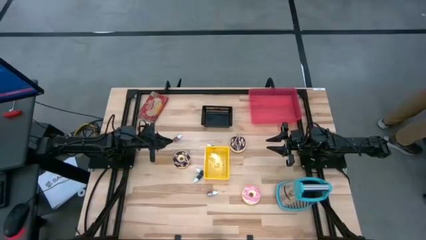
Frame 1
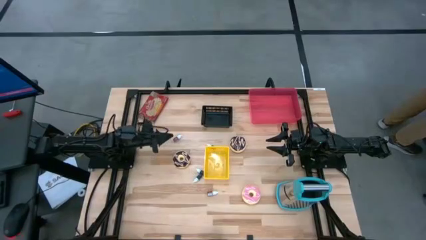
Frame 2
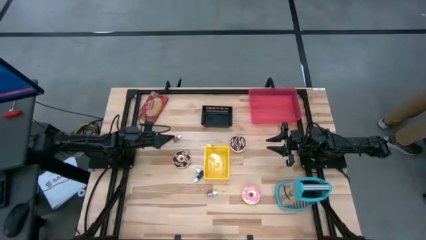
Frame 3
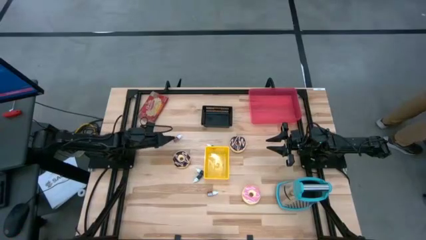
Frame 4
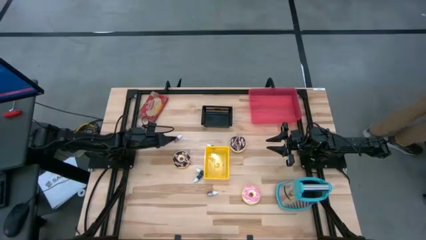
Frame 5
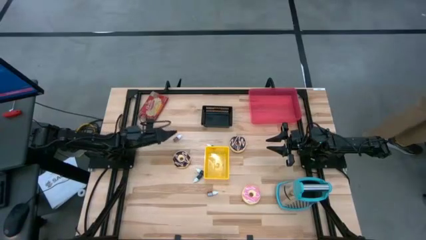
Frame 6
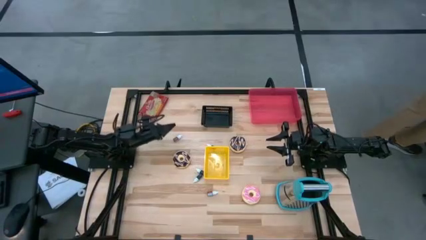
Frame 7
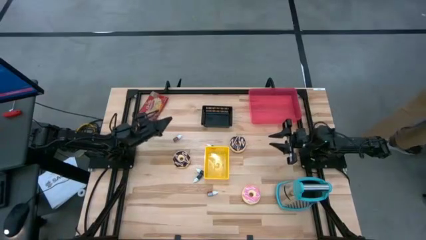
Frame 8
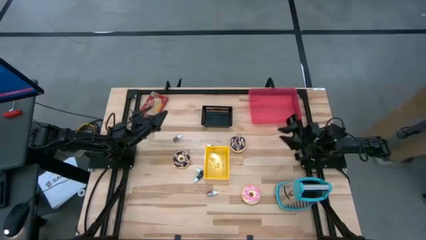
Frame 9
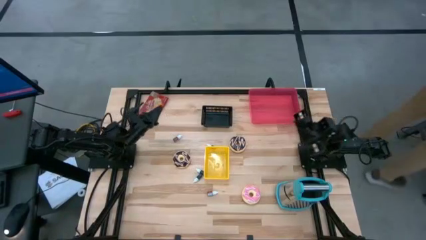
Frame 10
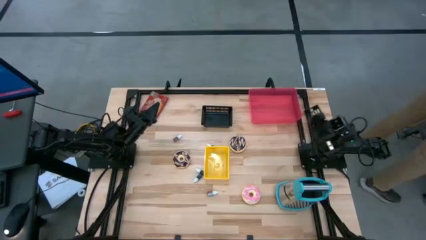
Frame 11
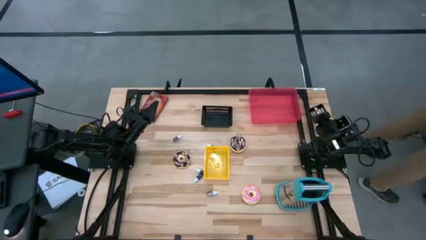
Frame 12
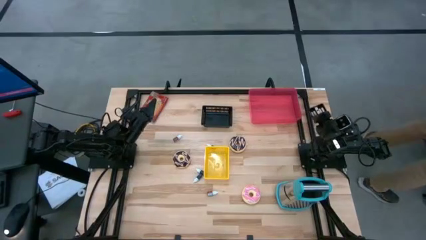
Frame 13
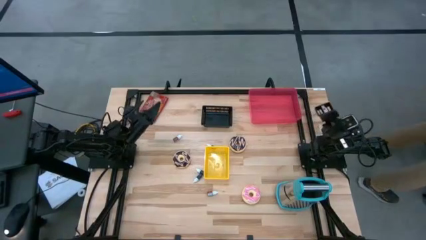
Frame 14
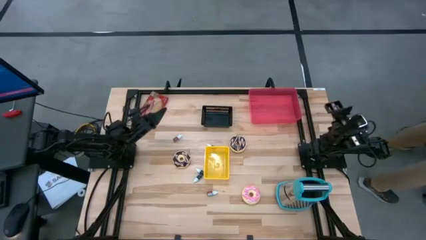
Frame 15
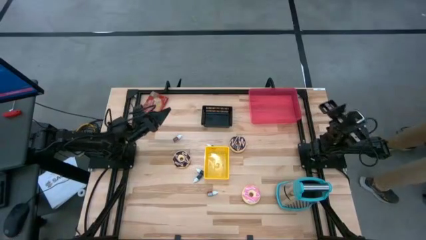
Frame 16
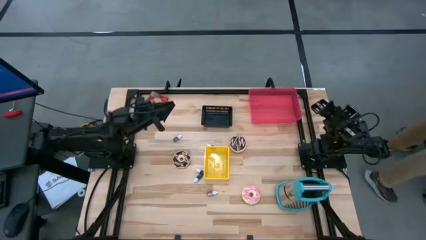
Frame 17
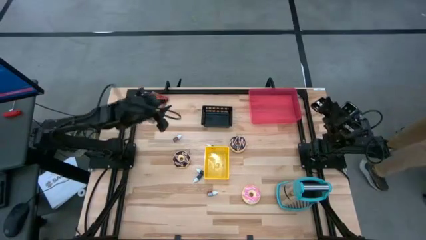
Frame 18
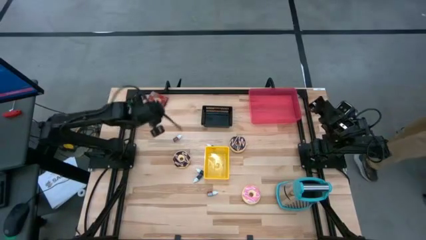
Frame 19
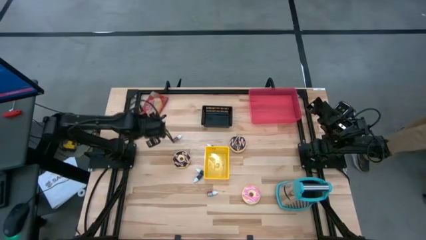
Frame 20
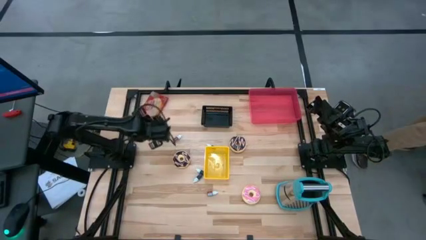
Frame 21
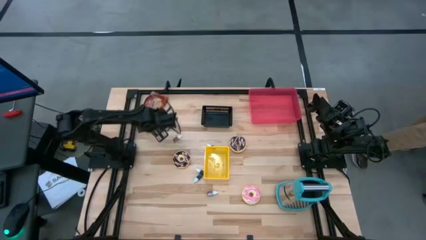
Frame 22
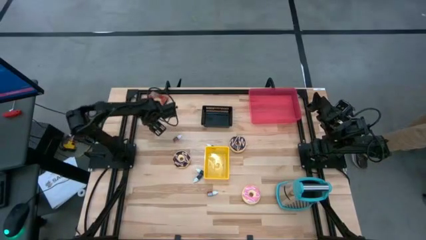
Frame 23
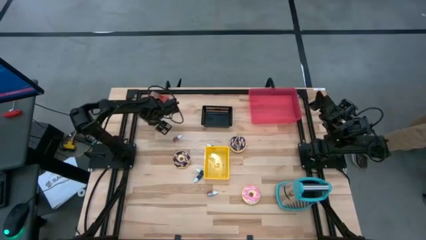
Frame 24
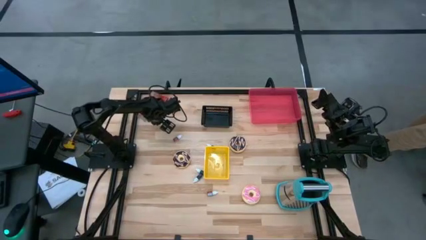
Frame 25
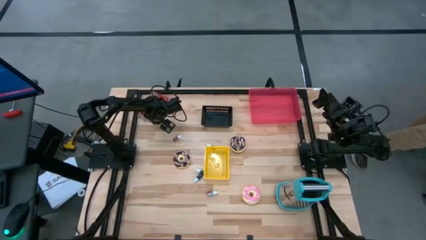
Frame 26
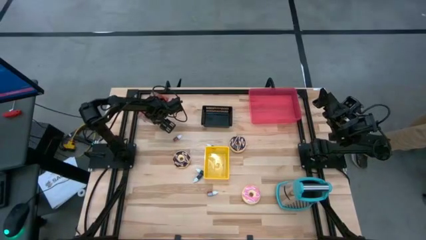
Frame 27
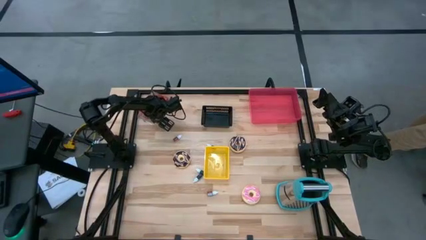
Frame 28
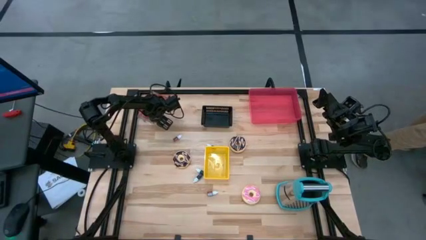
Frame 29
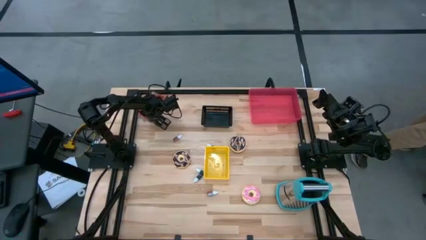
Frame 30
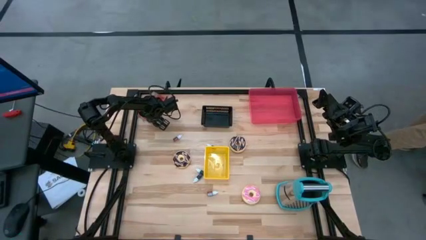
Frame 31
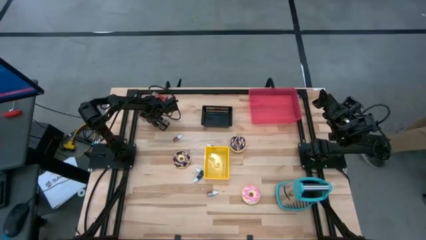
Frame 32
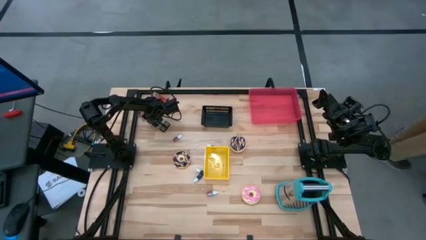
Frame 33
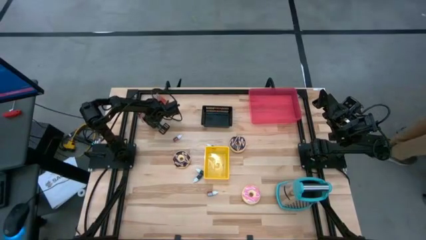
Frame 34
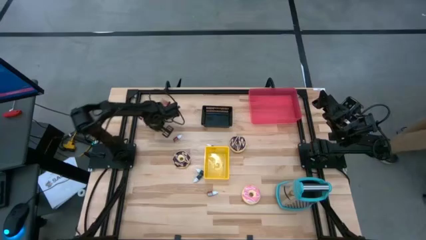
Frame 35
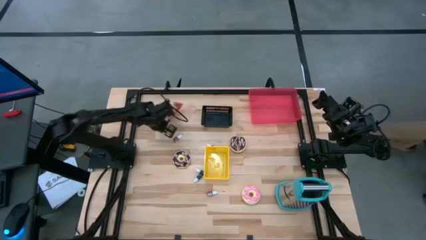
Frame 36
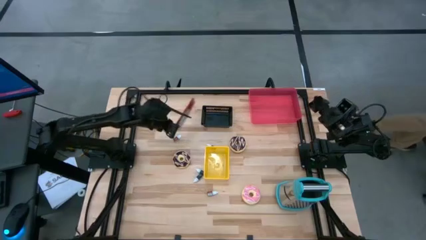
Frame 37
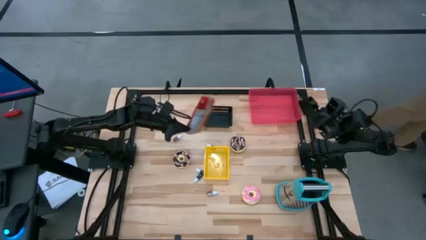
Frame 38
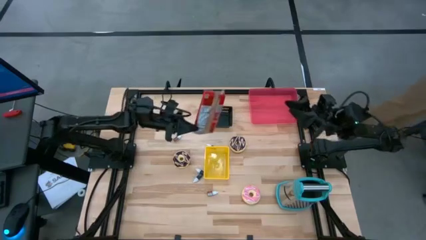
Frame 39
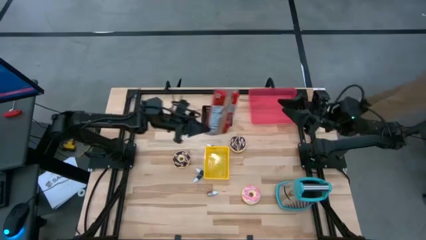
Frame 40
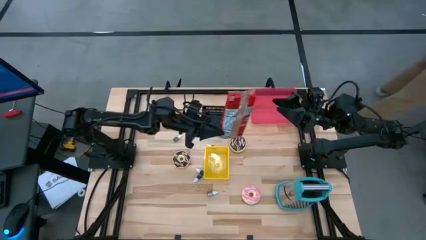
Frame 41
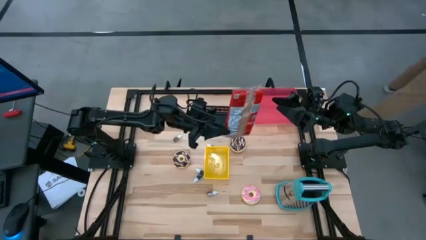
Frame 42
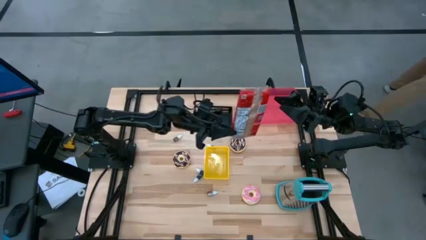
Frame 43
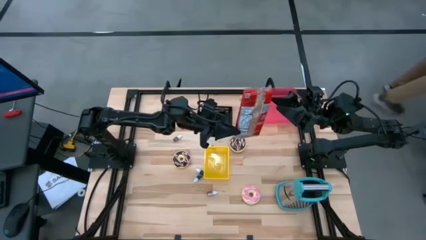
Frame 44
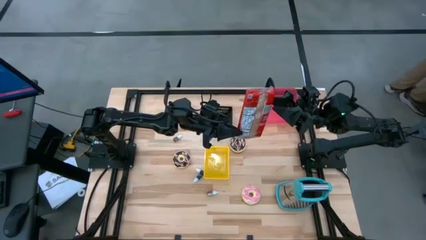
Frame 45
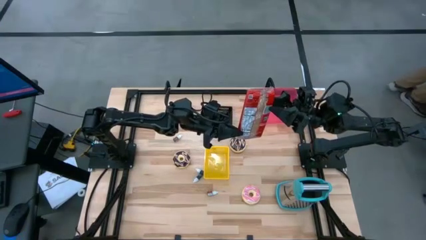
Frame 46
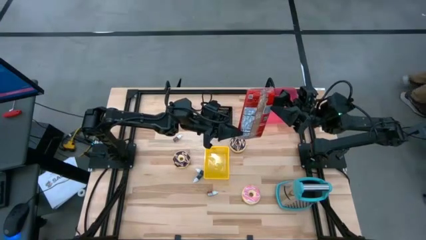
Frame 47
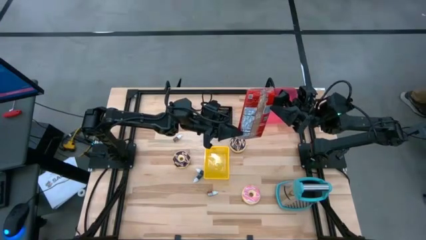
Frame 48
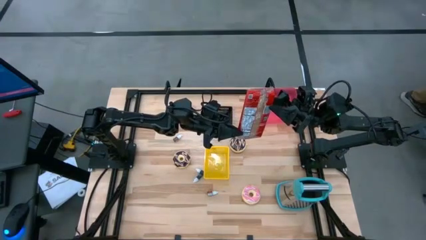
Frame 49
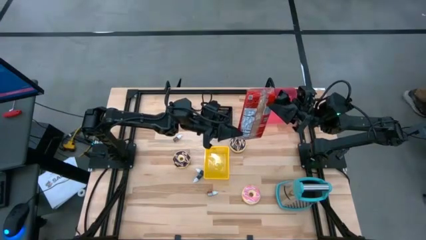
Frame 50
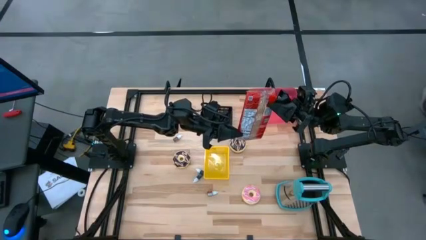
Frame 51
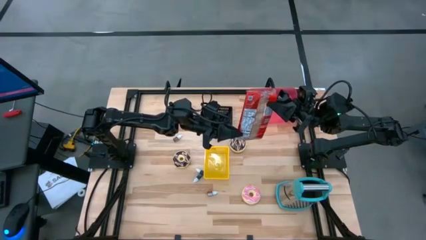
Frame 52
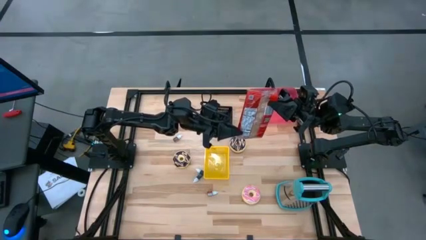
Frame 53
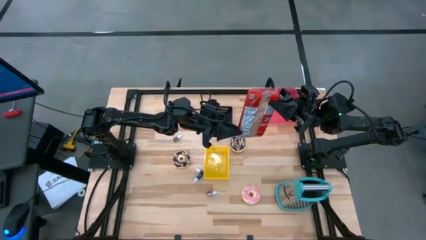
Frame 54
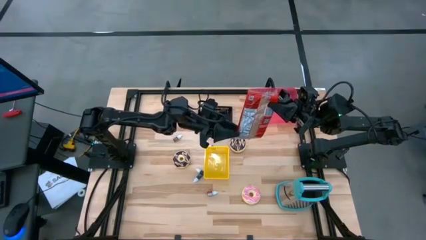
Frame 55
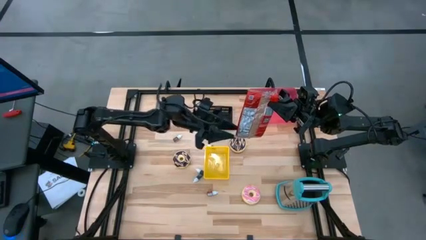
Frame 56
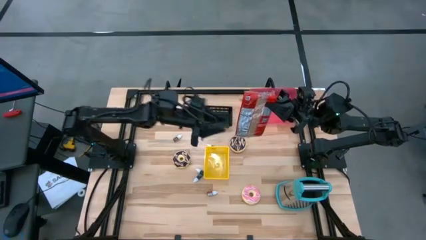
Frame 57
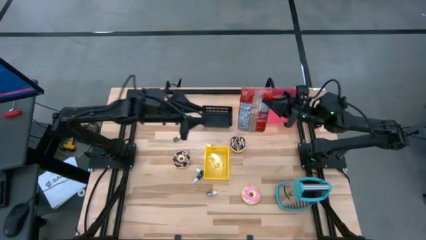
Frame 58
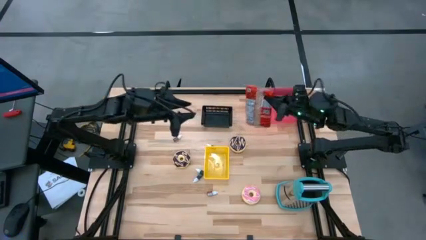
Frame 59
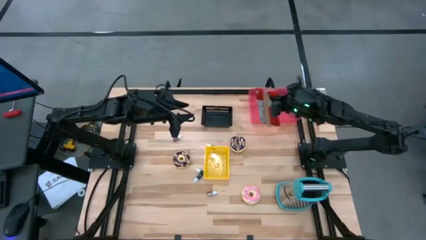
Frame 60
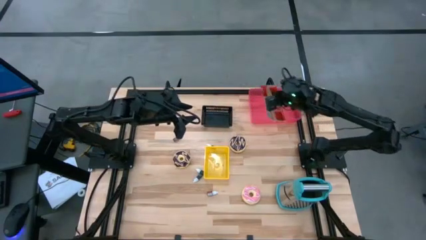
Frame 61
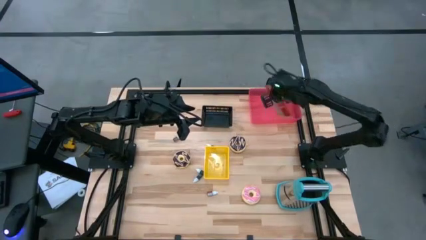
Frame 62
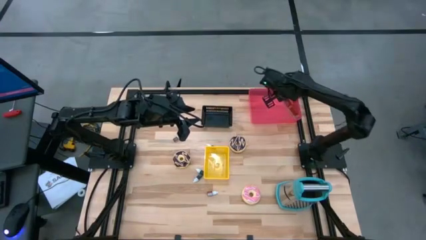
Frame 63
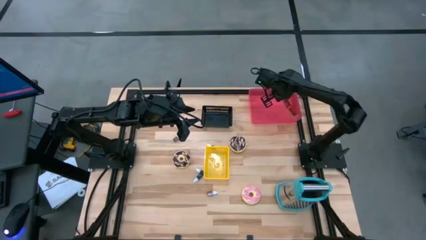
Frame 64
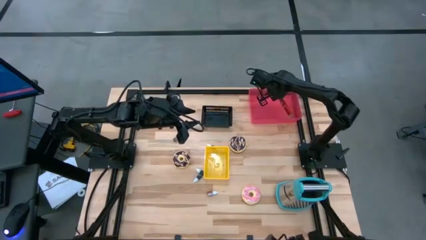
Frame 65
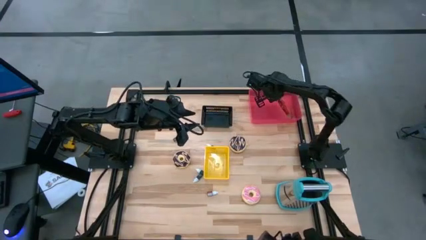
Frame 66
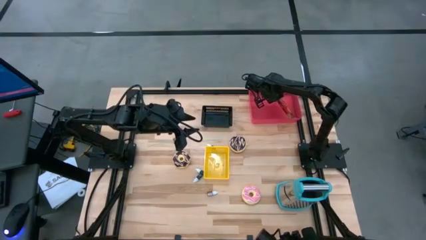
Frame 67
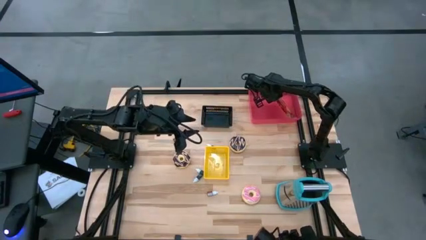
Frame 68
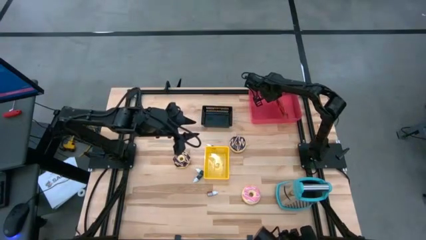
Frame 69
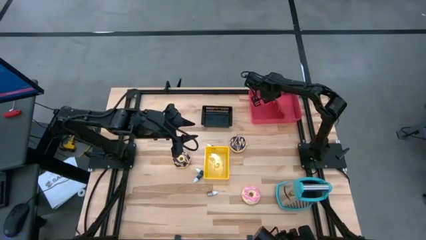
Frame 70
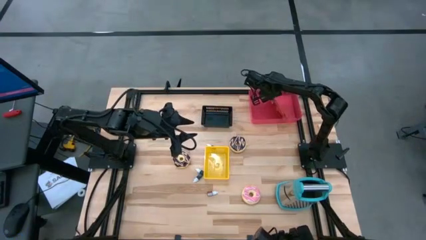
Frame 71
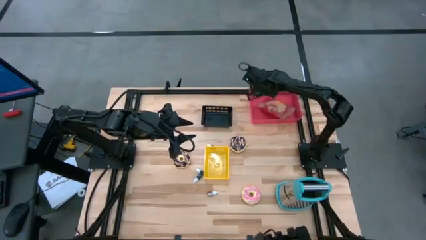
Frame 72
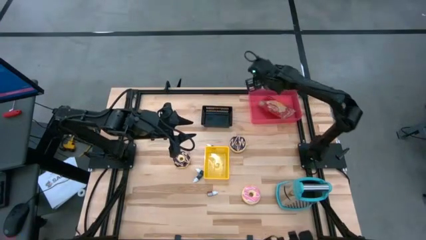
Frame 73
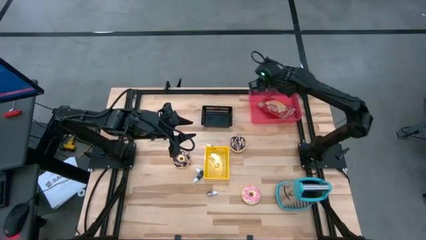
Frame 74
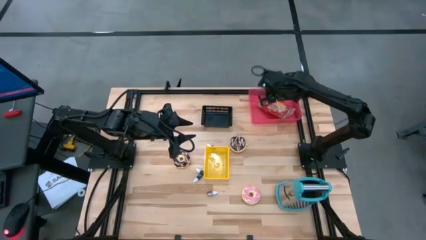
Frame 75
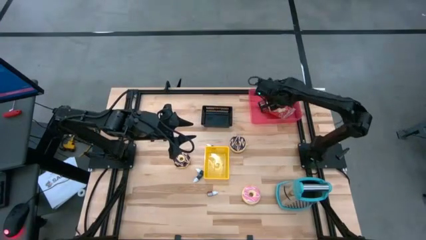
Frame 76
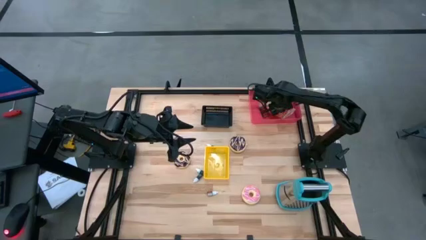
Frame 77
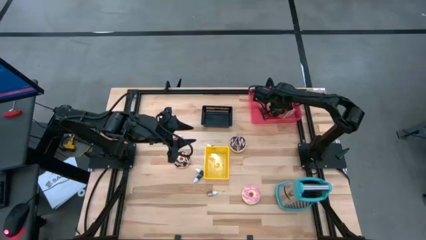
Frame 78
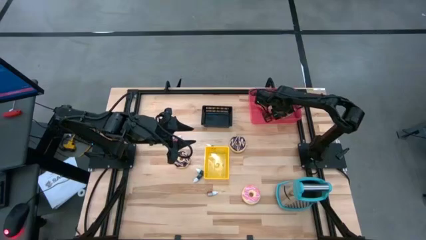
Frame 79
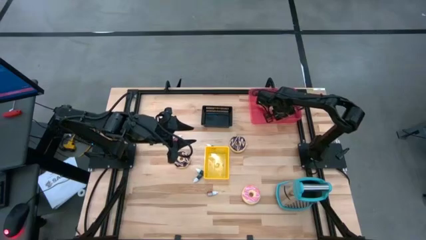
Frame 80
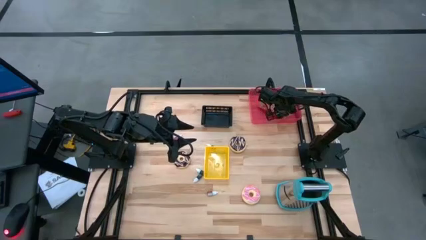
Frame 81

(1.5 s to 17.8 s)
Put the red popcorn bag into the pink bin
